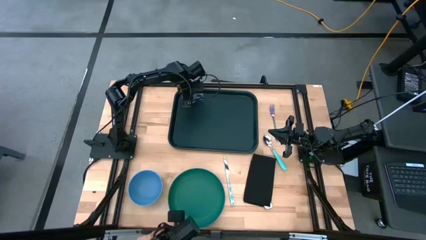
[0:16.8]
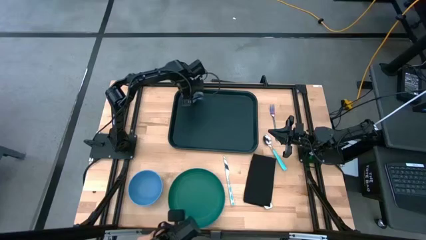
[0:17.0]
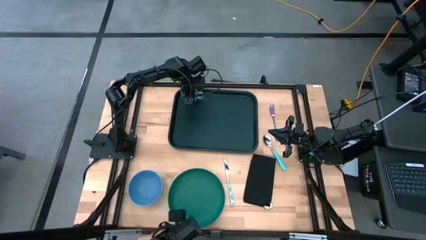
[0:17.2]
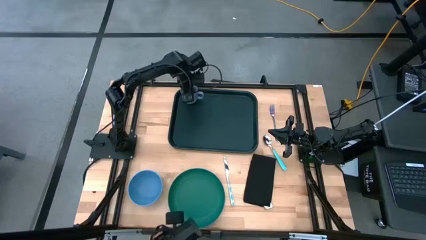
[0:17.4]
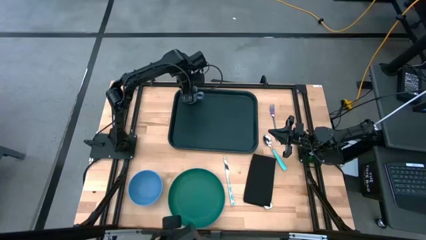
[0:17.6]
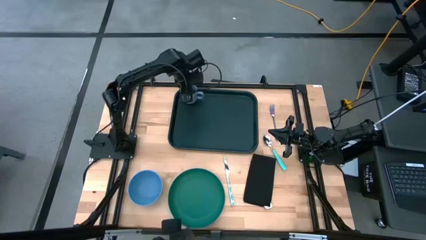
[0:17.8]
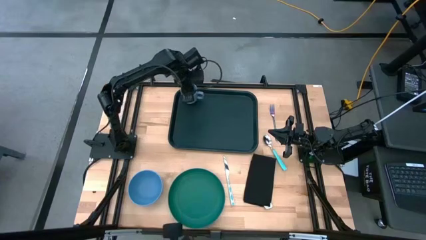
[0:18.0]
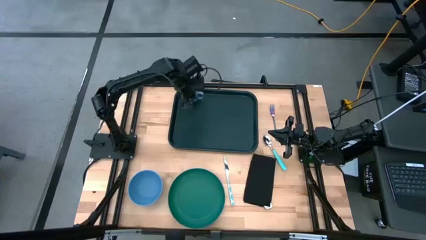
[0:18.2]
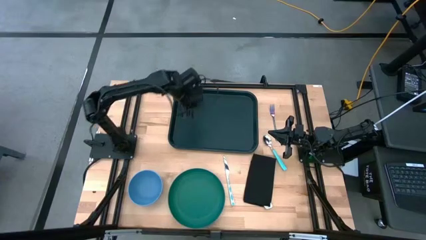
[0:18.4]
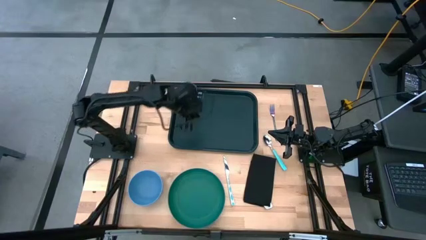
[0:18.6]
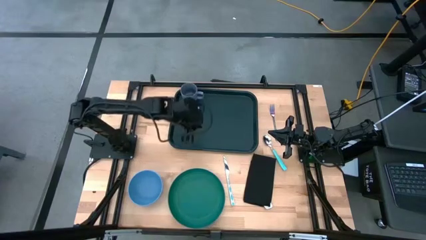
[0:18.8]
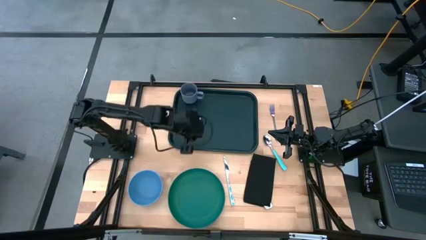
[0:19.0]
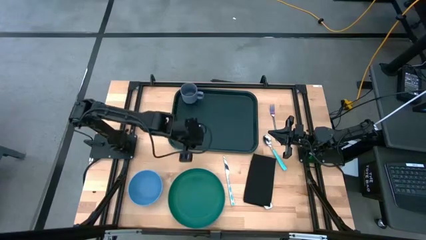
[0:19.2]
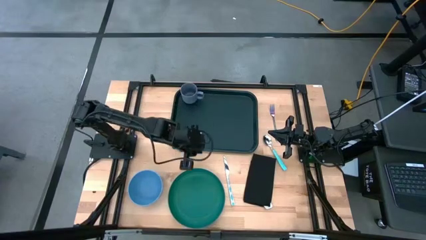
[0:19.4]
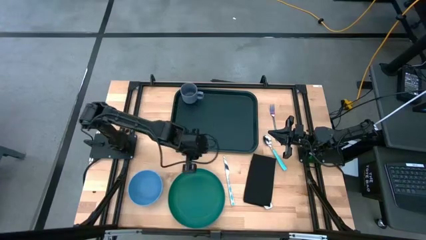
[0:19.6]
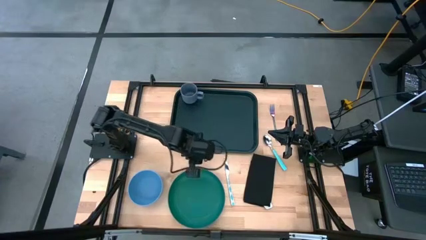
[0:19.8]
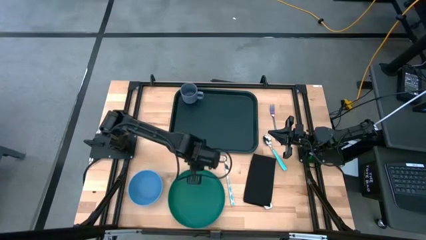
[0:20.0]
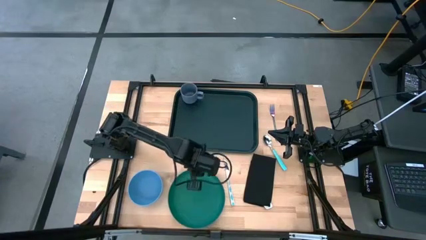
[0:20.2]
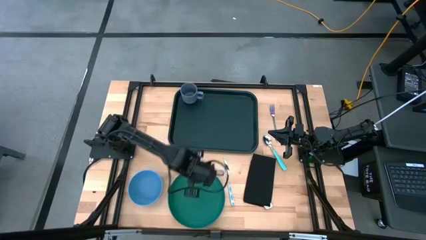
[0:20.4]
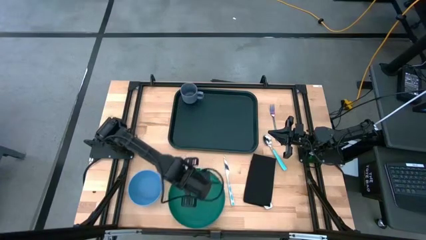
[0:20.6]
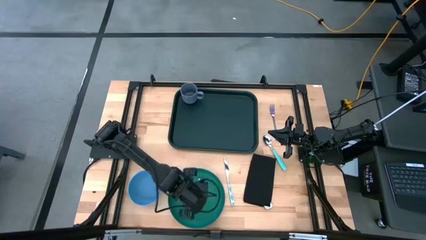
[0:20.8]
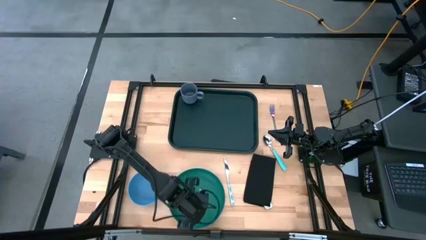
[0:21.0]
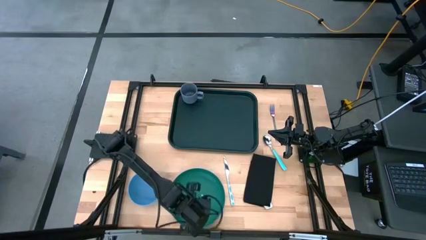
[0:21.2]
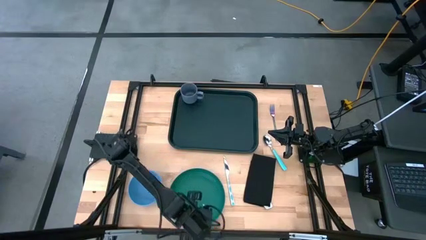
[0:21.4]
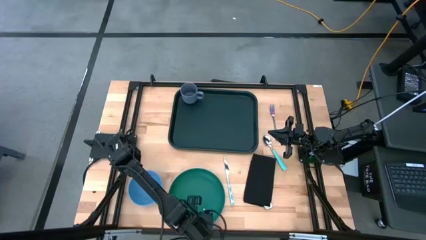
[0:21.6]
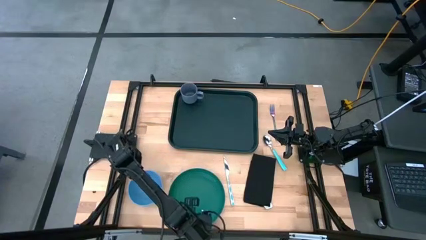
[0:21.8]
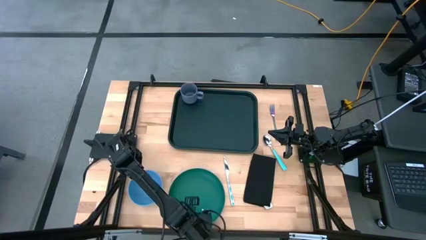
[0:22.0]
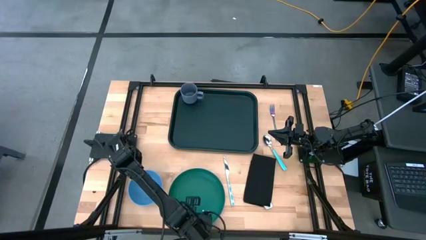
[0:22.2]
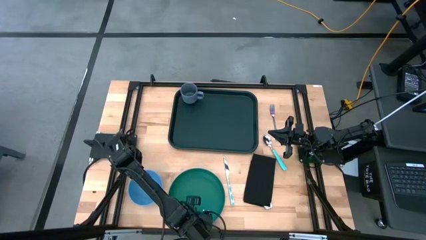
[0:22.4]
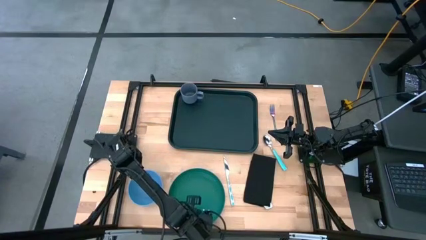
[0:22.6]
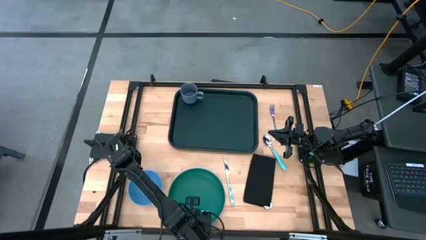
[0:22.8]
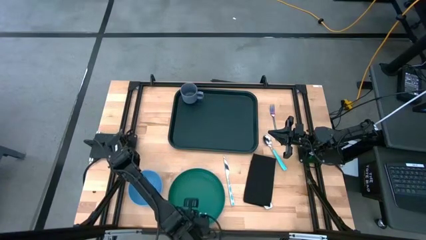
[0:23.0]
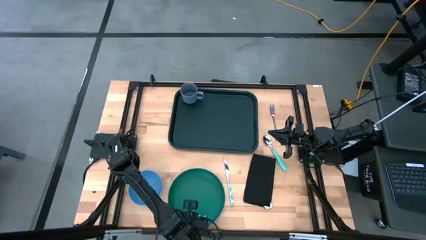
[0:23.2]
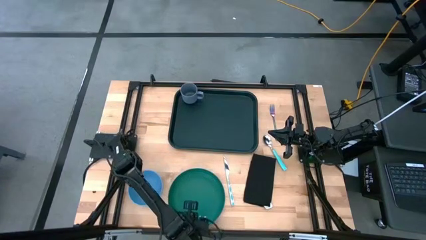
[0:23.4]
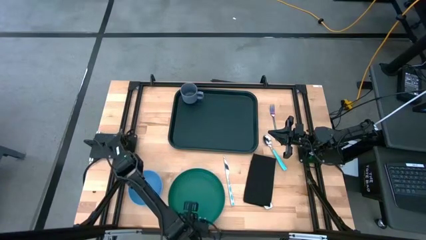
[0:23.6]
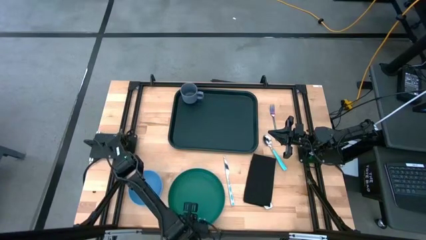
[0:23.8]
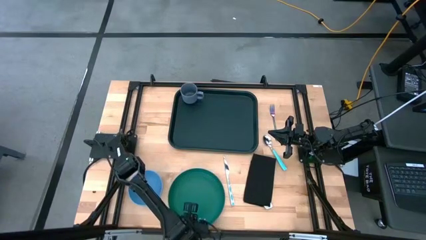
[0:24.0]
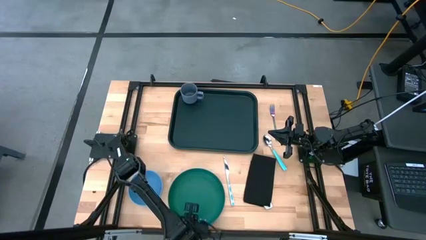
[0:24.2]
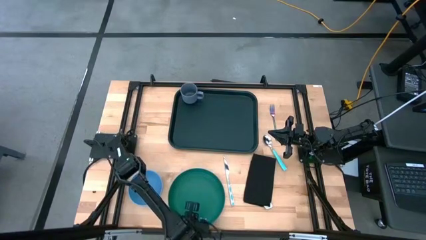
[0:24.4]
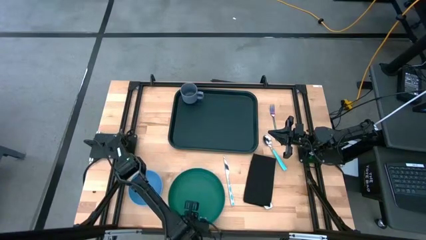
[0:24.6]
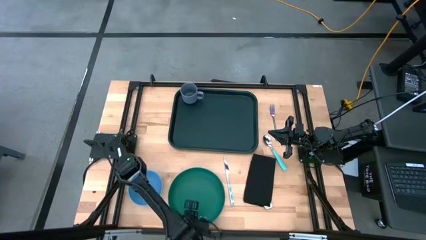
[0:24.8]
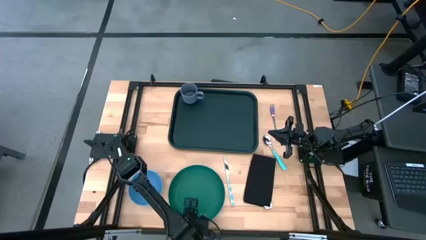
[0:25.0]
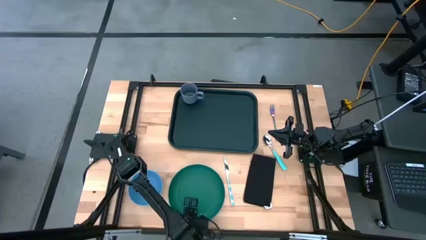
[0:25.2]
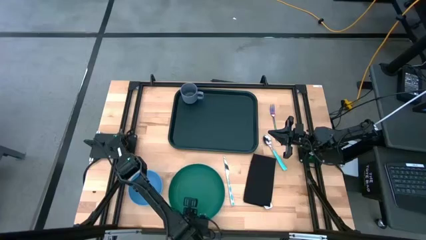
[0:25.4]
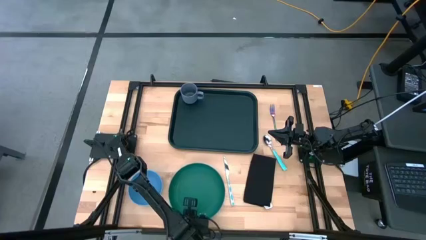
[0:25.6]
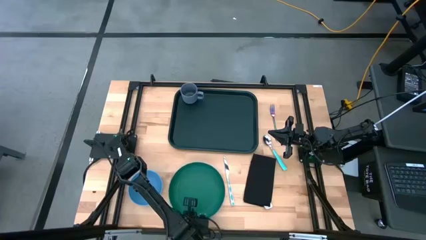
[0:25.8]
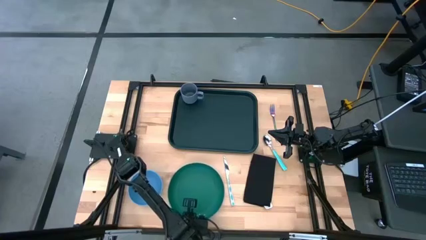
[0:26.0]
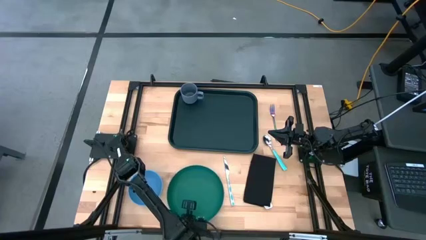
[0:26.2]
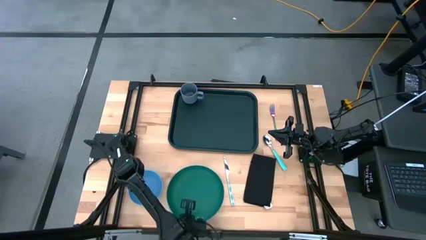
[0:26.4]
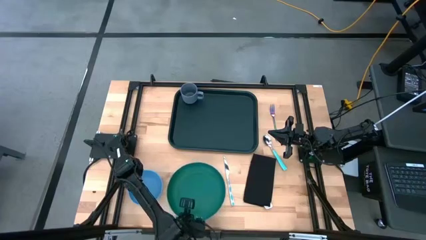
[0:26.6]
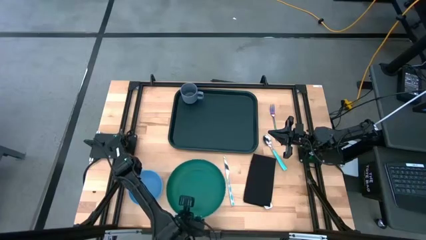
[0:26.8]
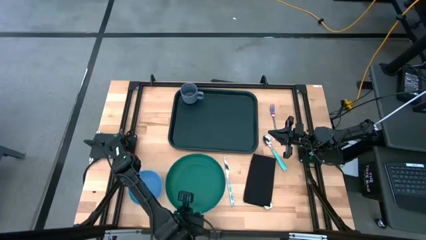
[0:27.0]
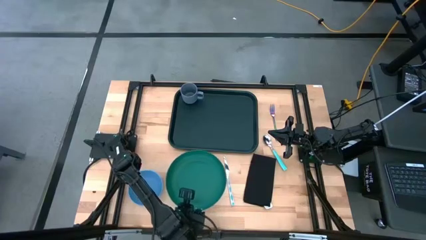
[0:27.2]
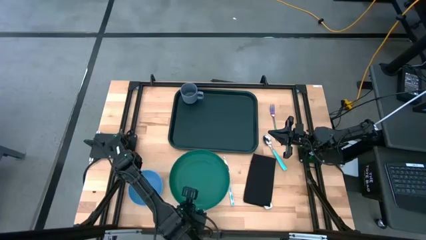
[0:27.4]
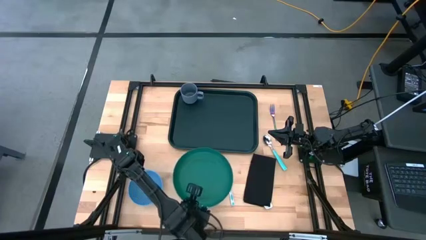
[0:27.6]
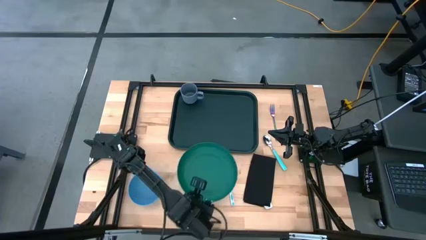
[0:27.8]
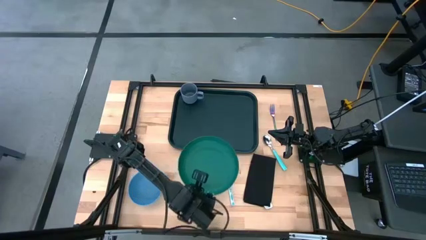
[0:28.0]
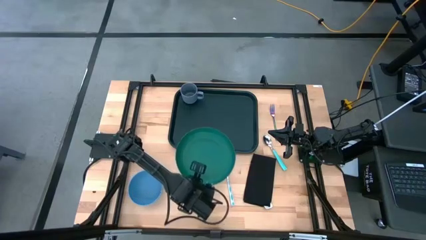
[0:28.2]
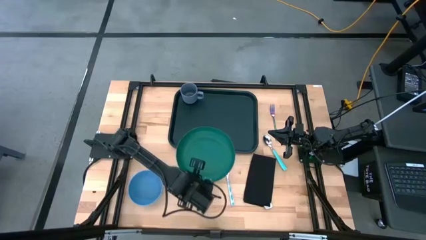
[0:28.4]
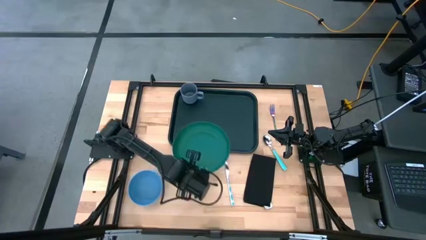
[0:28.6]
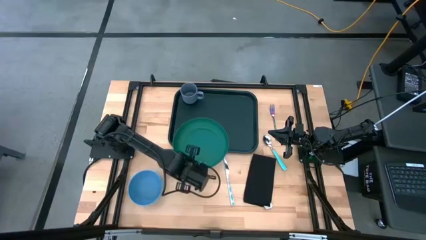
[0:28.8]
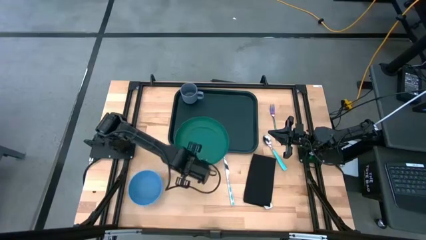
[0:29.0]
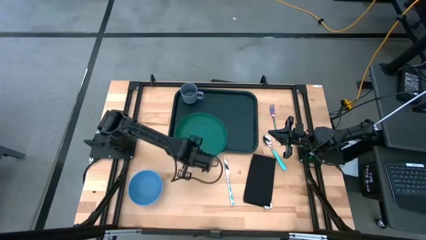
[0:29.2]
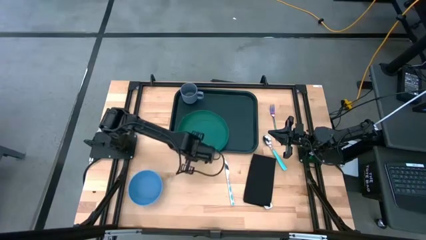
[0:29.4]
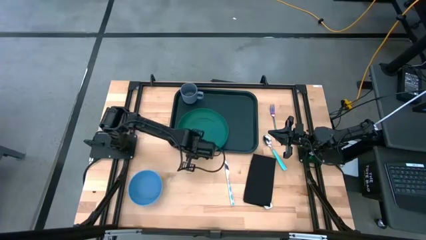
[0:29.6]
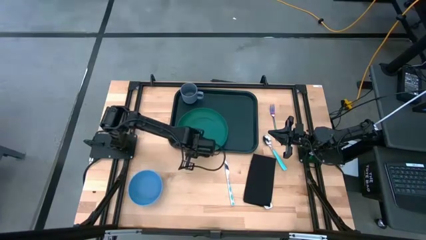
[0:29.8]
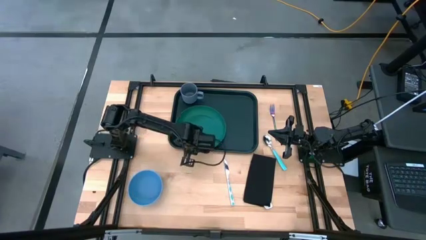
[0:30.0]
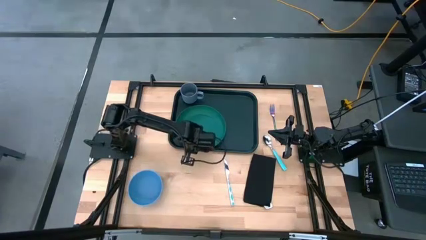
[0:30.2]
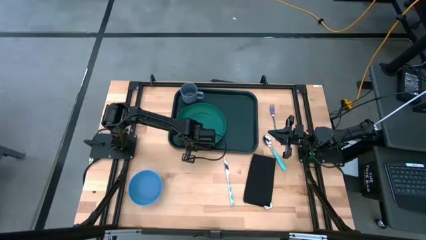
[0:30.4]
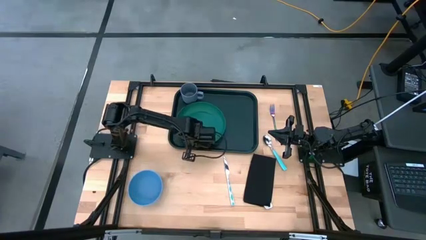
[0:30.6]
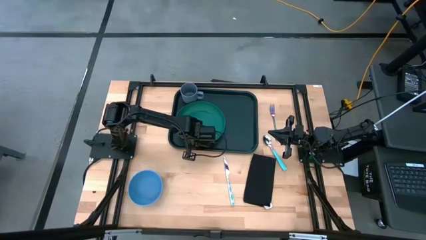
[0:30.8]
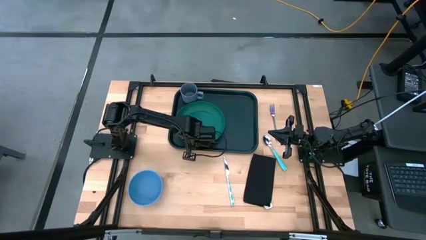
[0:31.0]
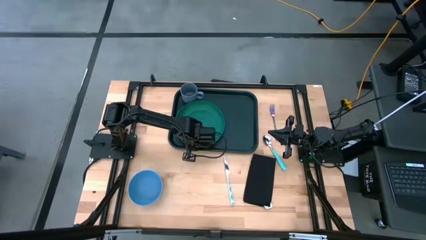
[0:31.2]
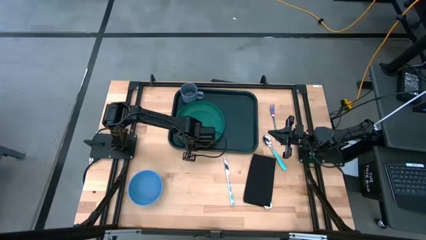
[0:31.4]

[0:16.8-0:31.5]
Task: Set up tray
Put the green plate on the green serving tray below the blue mug
